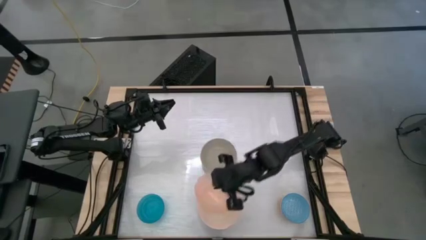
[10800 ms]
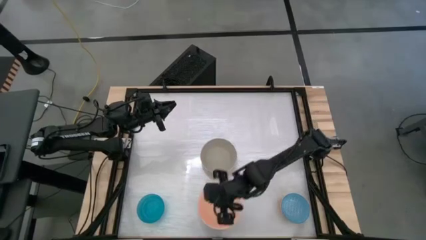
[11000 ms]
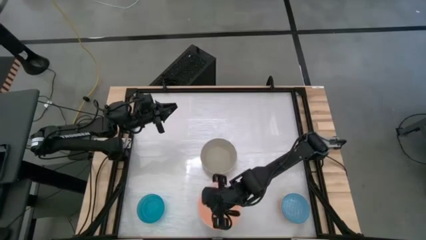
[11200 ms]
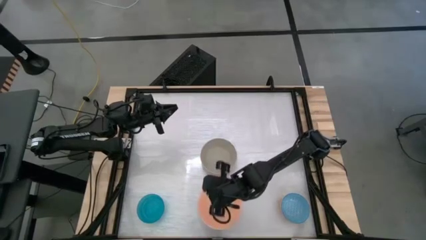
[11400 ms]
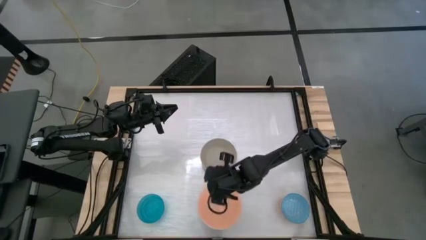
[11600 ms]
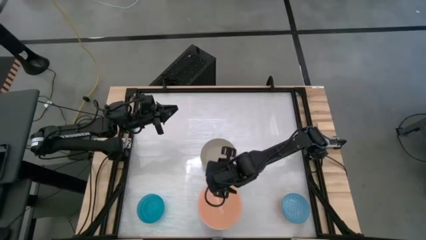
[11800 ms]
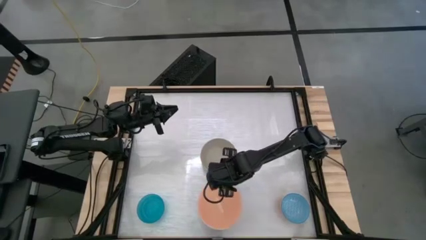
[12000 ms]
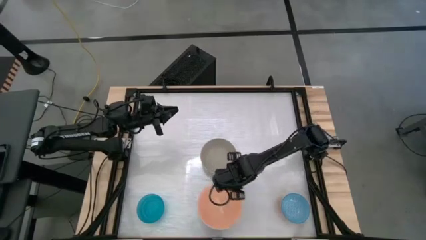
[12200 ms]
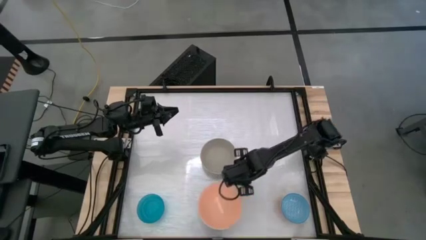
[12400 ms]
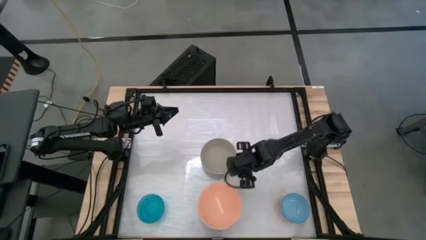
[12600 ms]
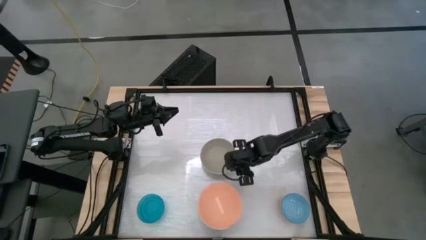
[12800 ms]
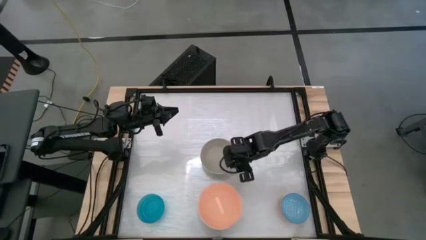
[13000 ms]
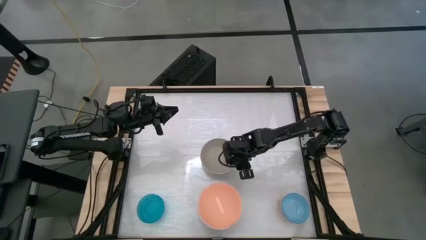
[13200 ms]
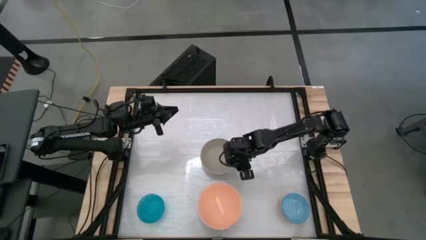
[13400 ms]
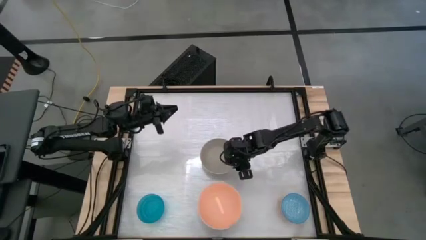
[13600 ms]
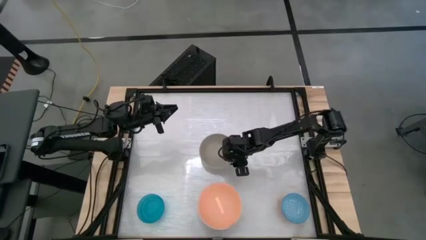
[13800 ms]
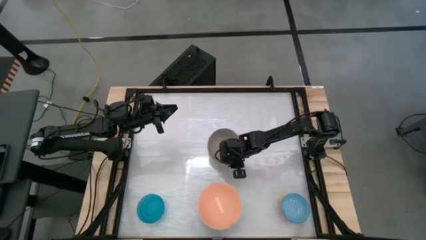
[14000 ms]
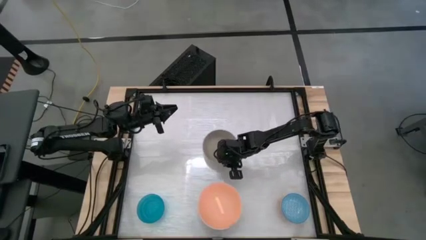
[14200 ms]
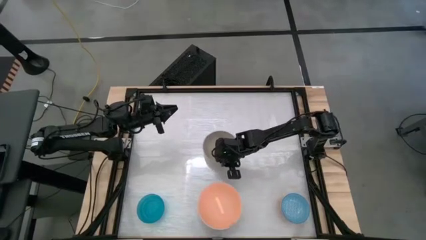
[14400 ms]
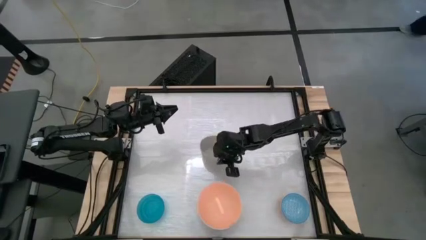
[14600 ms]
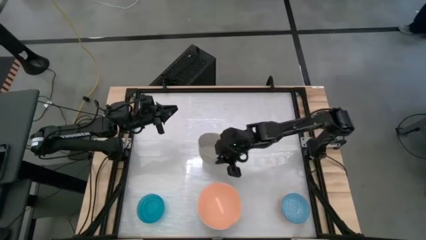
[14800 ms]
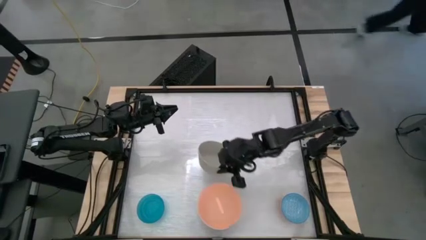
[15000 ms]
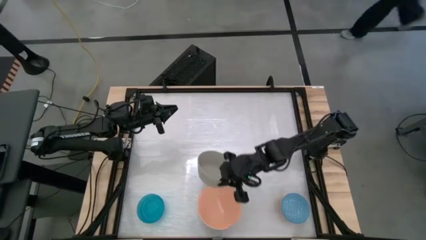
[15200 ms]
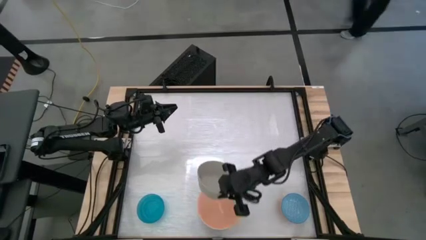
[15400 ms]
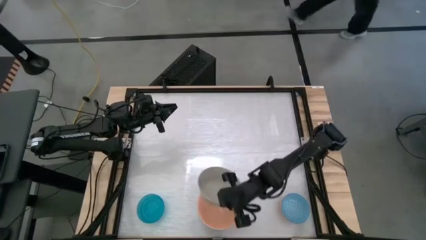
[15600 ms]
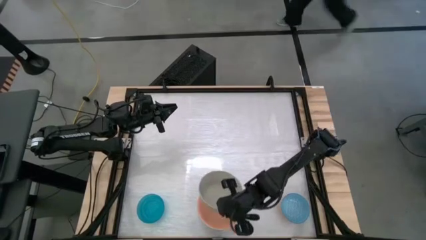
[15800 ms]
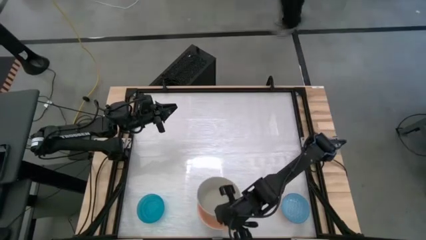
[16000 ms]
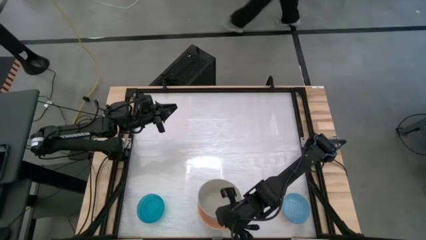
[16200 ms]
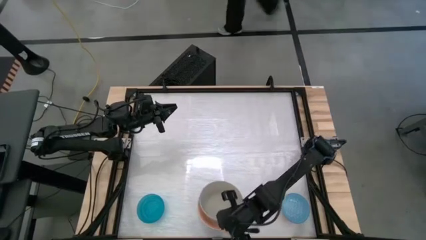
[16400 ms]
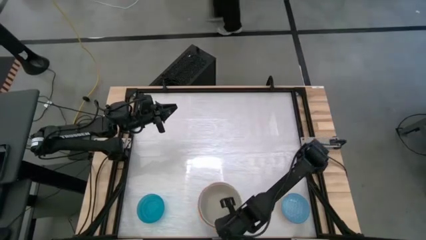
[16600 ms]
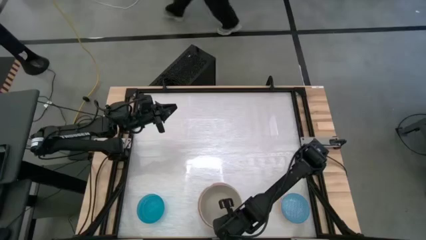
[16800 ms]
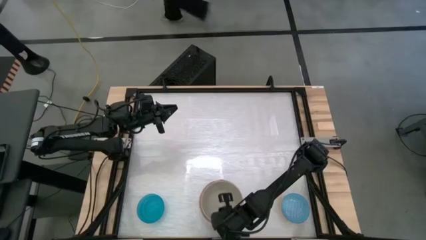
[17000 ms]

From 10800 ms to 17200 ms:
Stack the gray bowl on top of the orange bowl

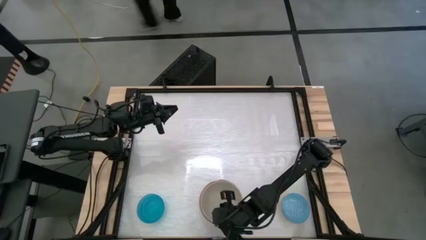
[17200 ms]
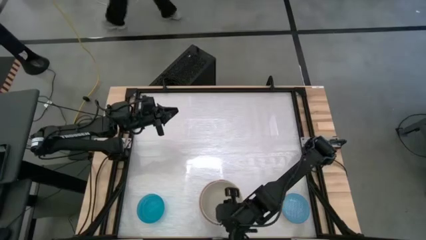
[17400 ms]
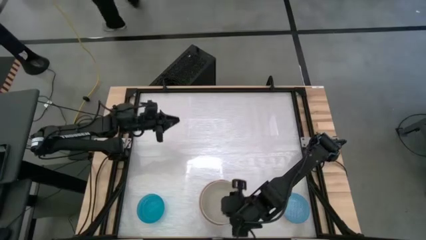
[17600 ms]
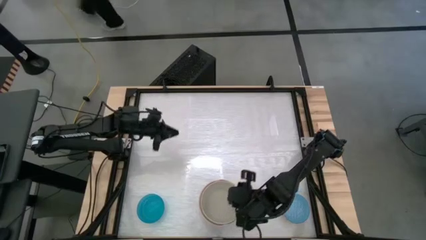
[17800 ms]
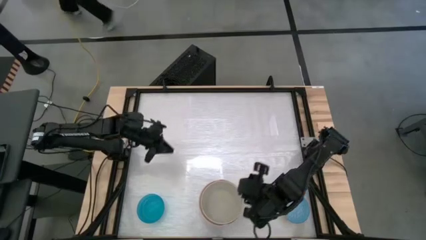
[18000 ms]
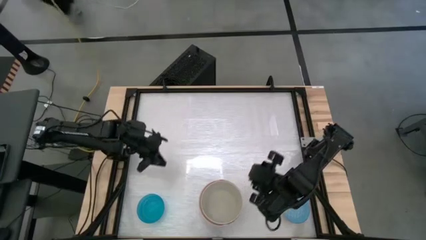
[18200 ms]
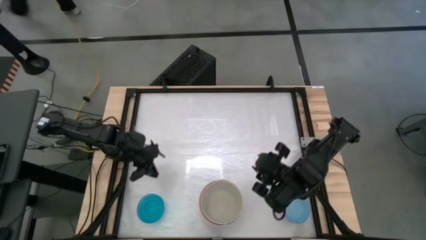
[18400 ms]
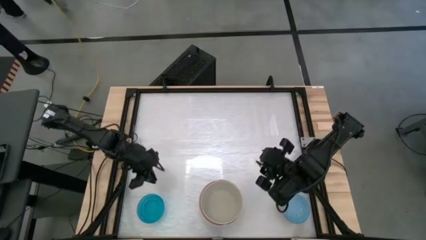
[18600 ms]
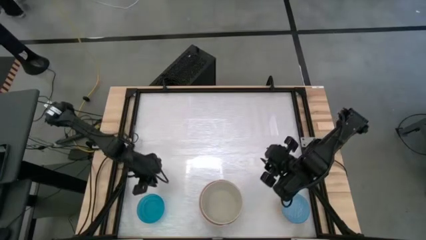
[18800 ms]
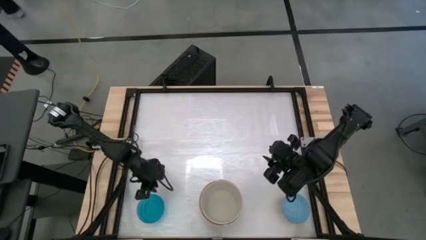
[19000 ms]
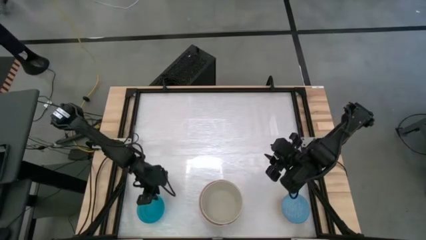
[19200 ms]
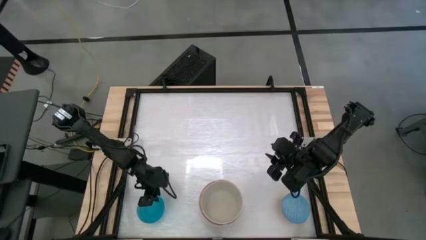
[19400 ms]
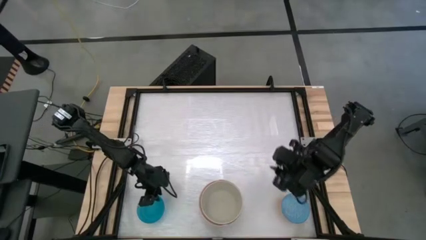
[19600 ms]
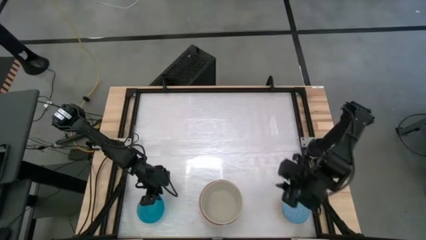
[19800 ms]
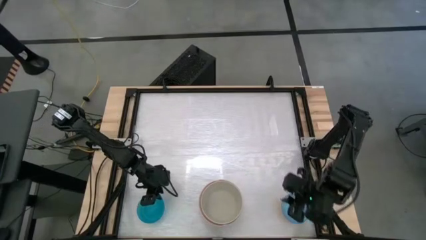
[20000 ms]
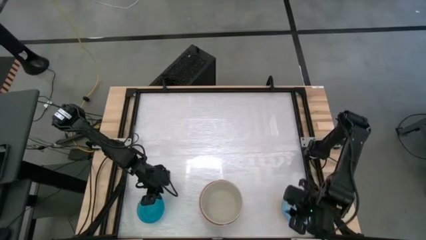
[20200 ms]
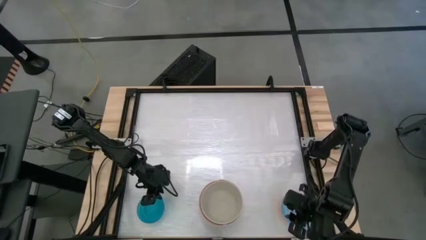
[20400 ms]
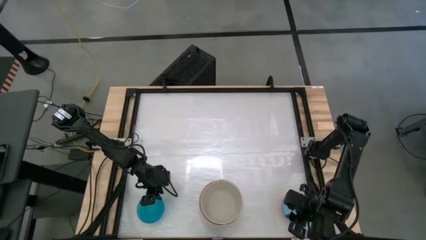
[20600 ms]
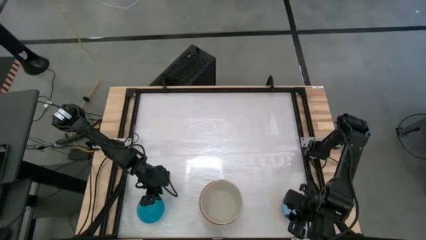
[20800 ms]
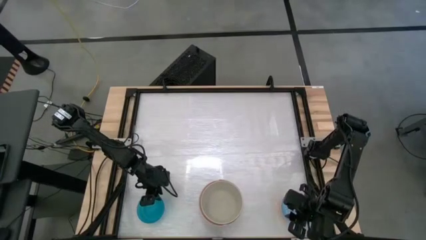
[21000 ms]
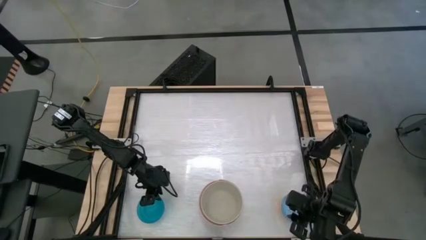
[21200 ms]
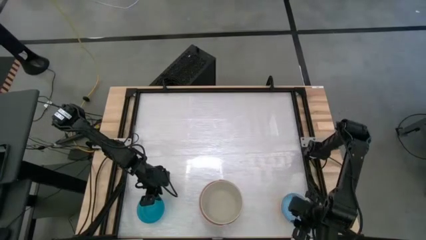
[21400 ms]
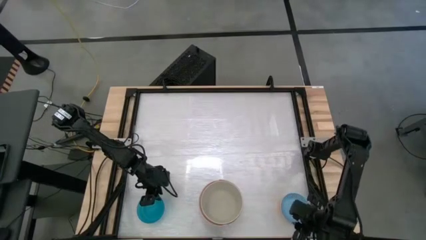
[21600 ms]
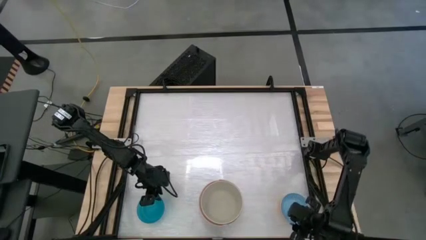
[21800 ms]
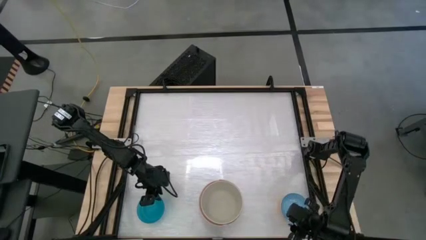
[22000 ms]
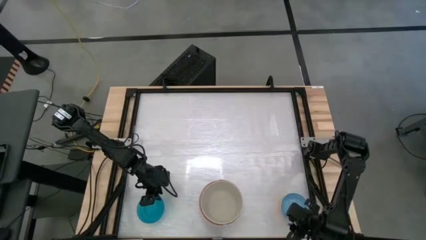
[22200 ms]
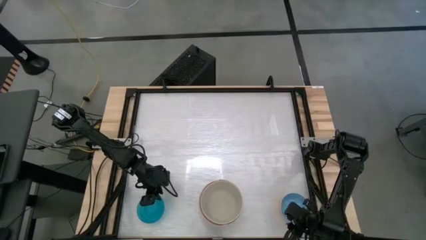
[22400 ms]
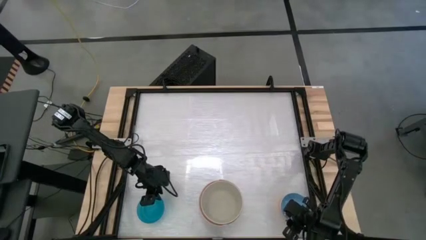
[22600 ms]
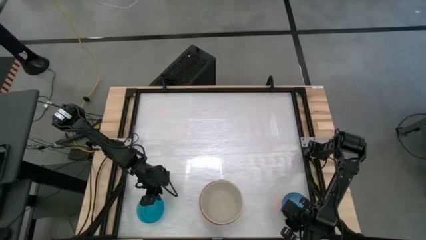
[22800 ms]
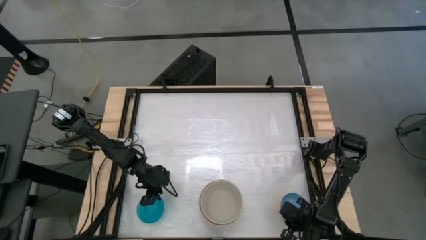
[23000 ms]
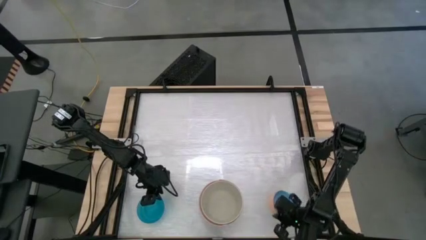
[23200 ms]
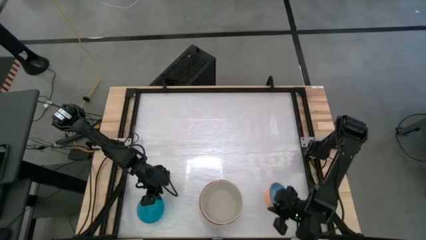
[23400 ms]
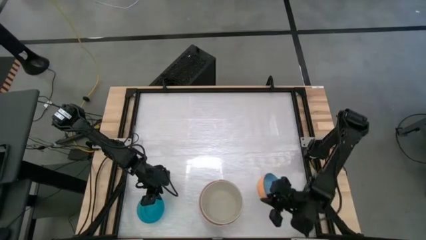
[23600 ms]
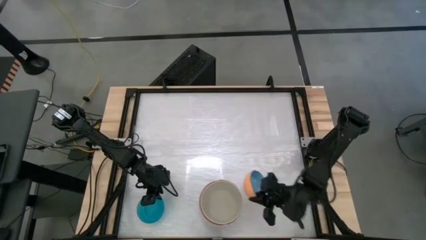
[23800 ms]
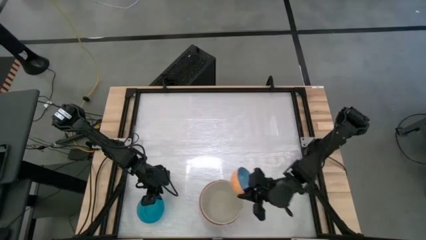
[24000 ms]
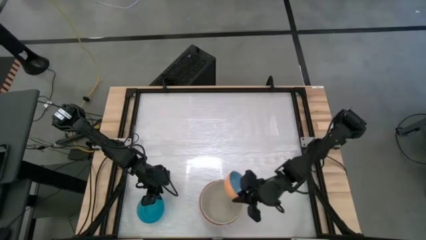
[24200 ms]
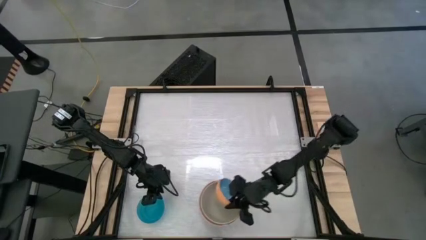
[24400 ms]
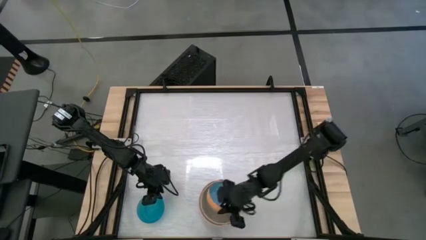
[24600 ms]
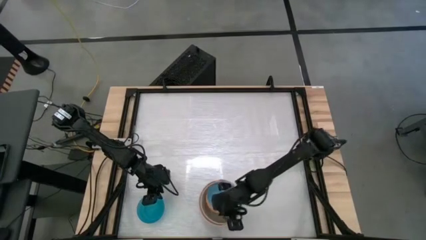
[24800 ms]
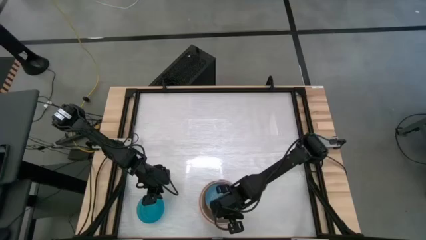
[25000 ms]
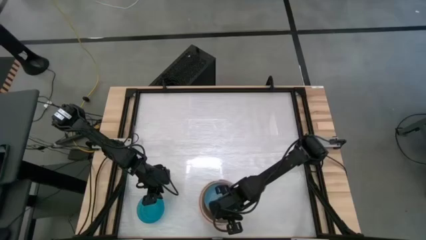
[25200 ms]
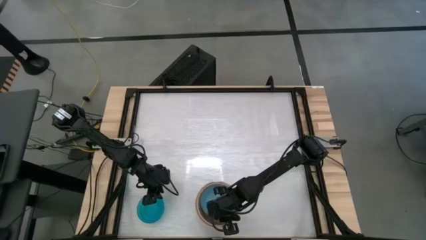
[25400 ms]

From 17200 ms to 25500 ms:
Stack the blue patterned bowl on top of the gray bowl

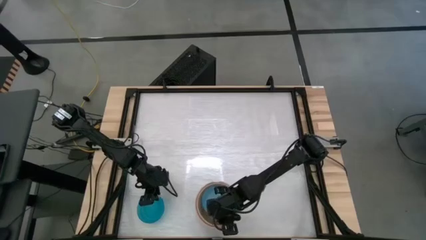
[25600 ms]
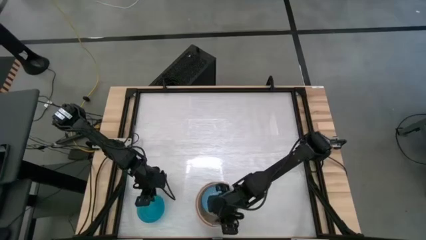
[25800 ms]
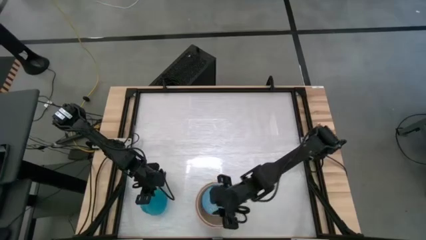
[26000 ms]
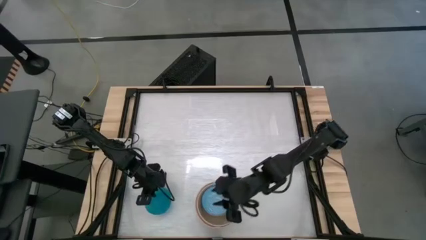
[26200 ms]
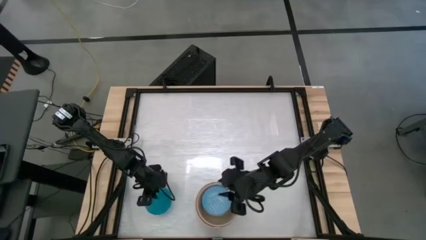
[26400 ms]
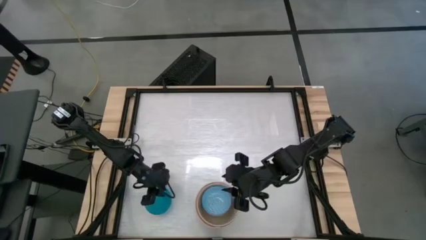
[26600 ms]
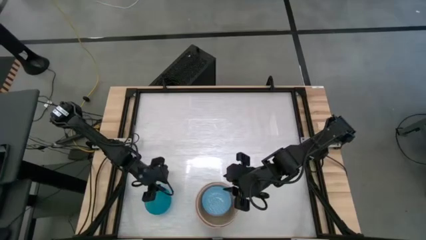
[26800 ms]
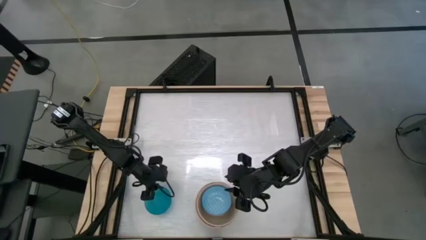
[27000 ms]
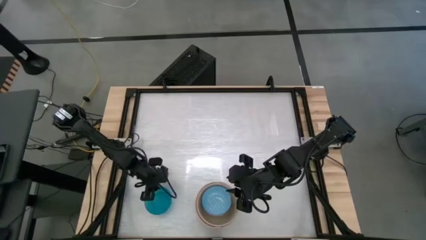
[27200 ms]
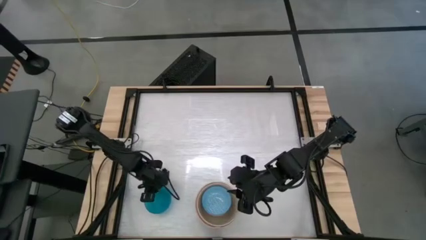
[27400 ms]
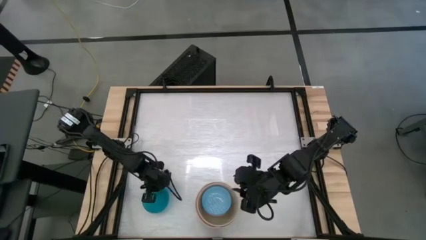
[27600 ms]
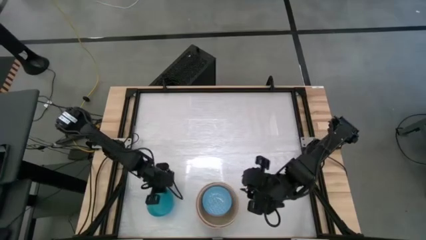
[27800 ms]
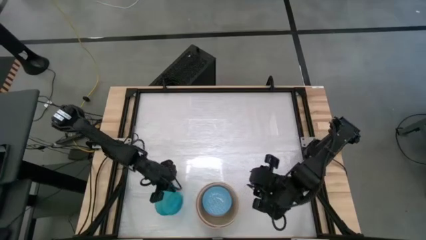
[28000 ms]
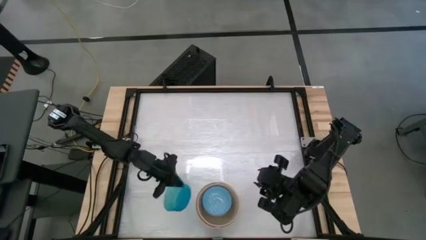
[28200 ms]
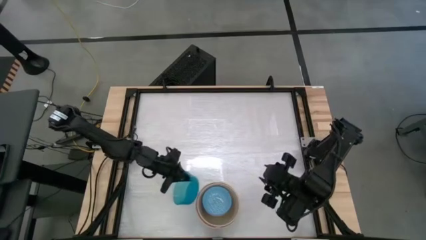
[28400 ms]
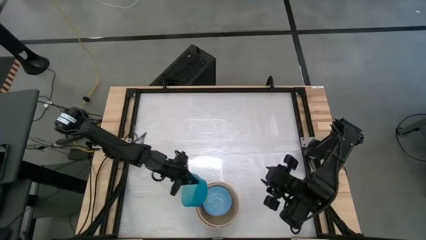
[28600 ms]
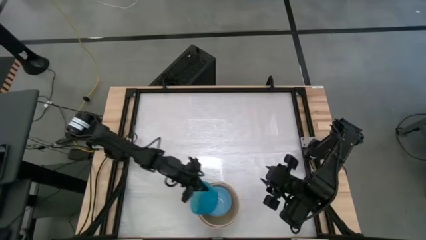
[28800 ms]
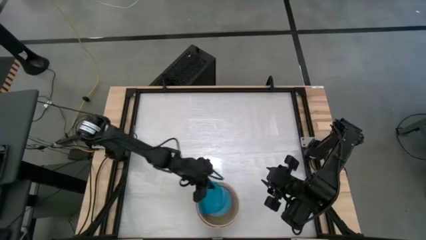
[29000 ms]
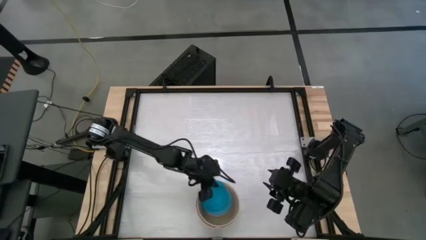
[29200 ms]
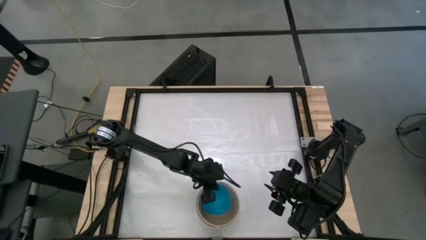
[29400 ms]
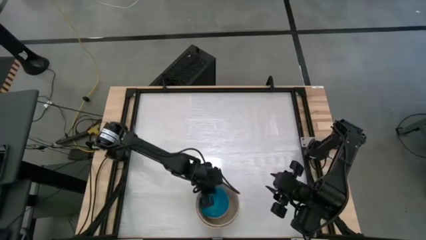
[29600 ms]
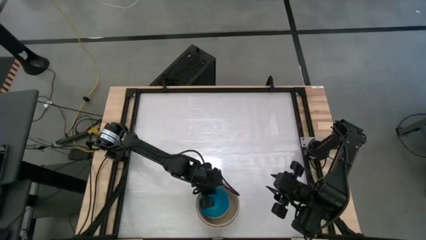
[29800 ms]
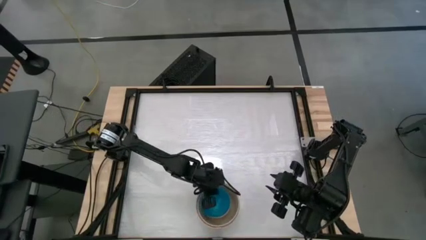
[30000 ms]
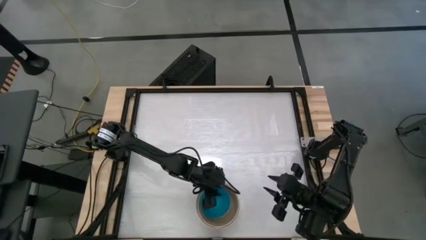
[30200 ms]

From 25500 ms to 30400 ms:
Stack the blue bowl on top of the blue patterned bowl
